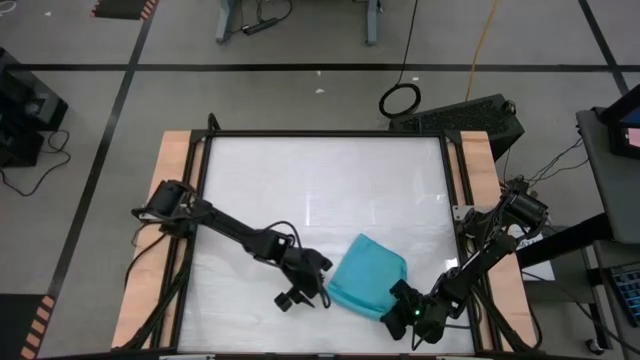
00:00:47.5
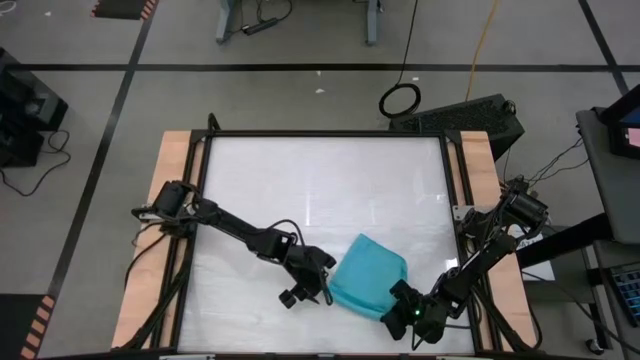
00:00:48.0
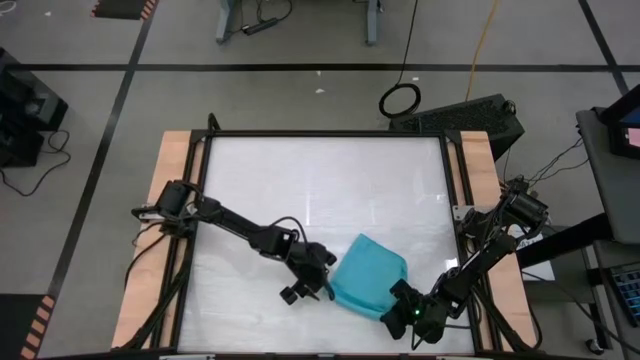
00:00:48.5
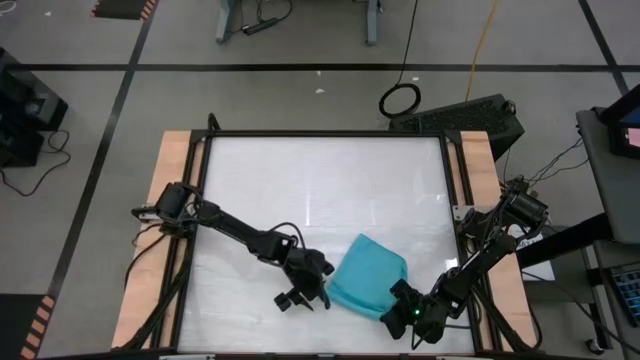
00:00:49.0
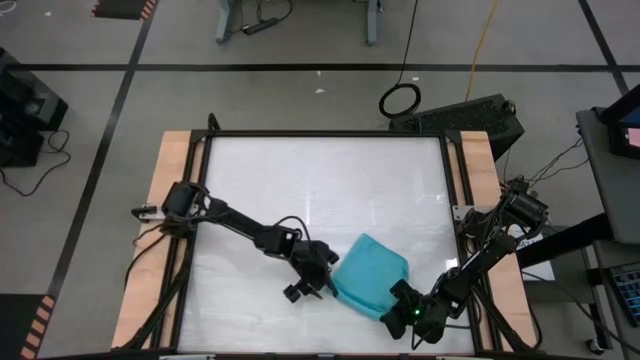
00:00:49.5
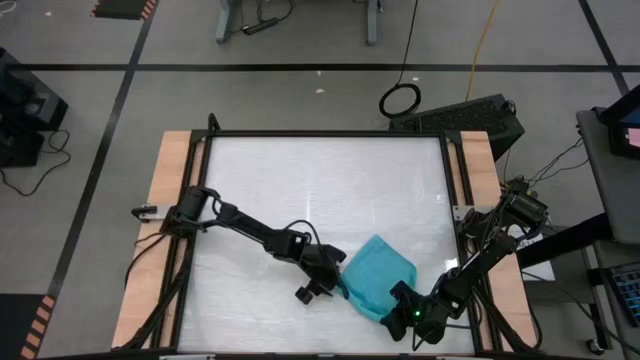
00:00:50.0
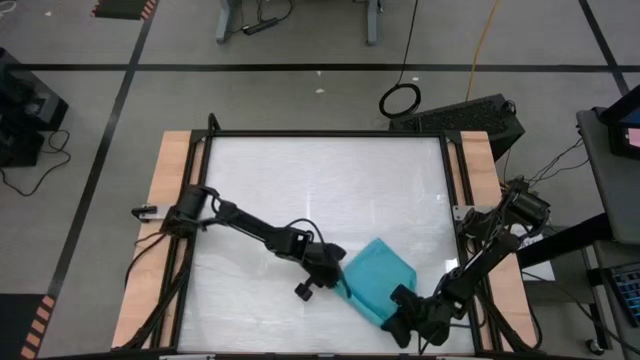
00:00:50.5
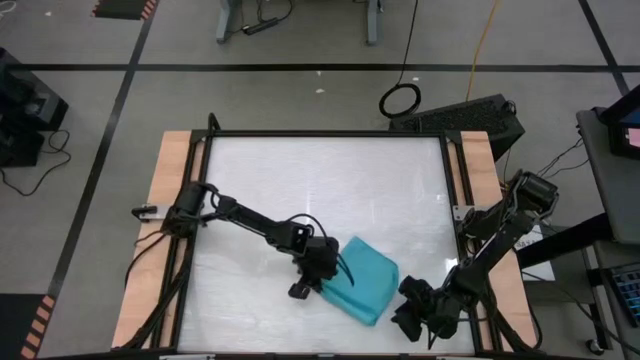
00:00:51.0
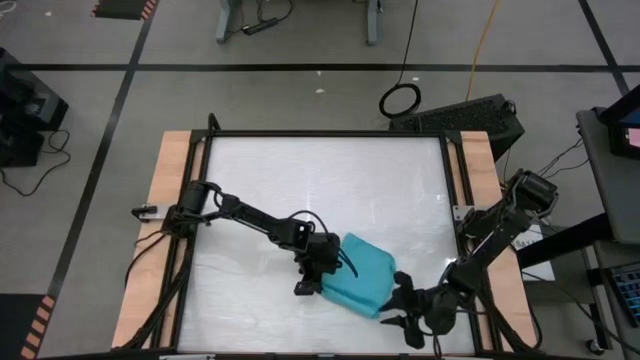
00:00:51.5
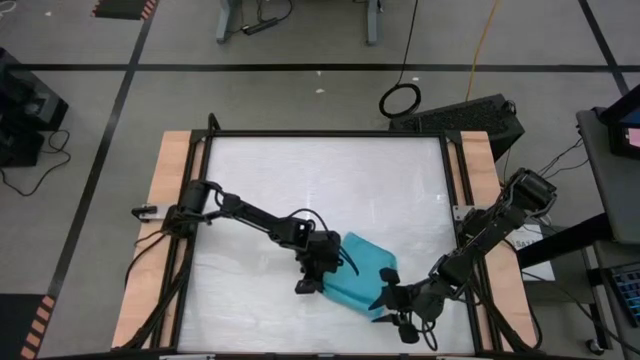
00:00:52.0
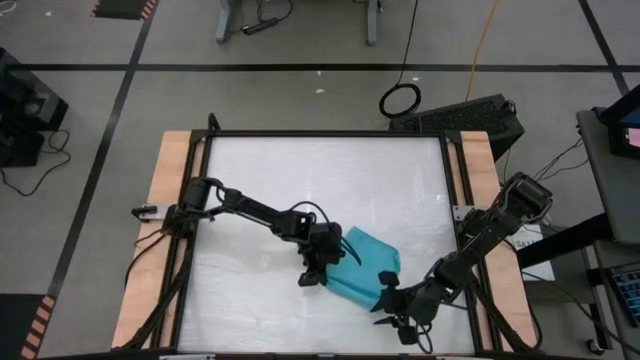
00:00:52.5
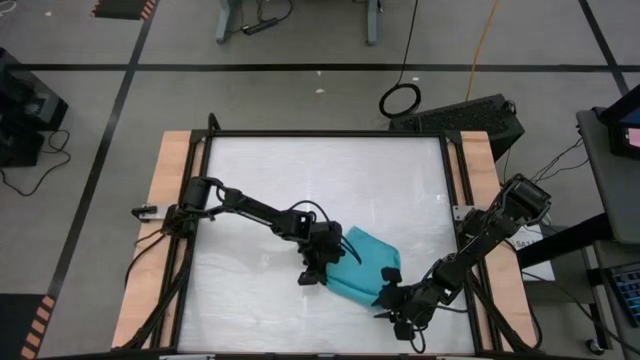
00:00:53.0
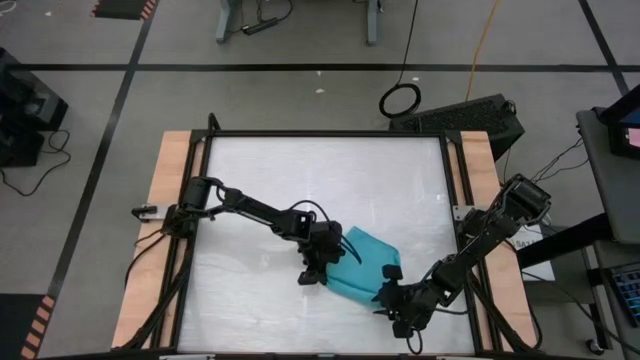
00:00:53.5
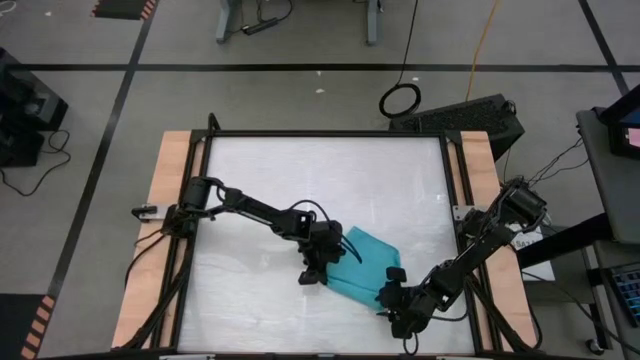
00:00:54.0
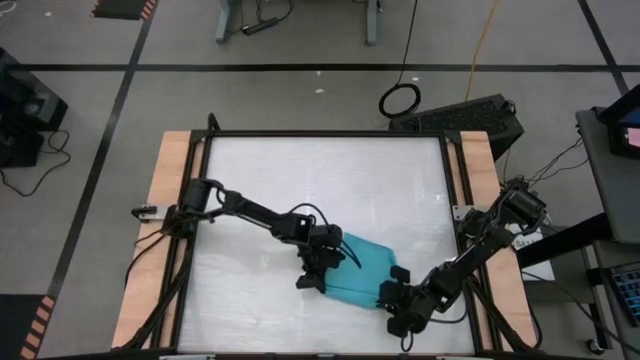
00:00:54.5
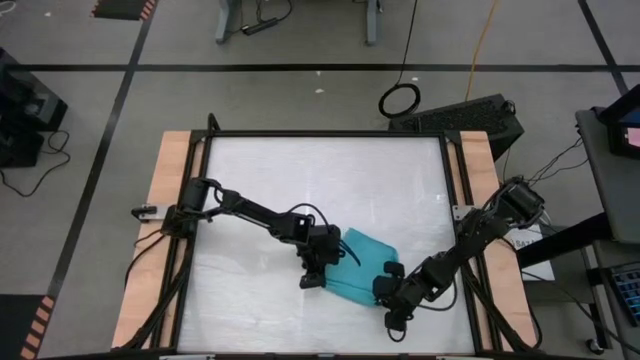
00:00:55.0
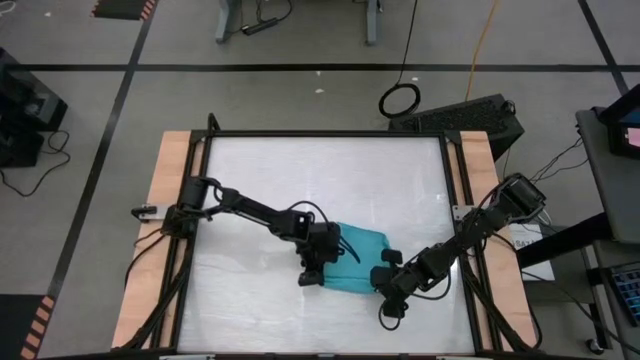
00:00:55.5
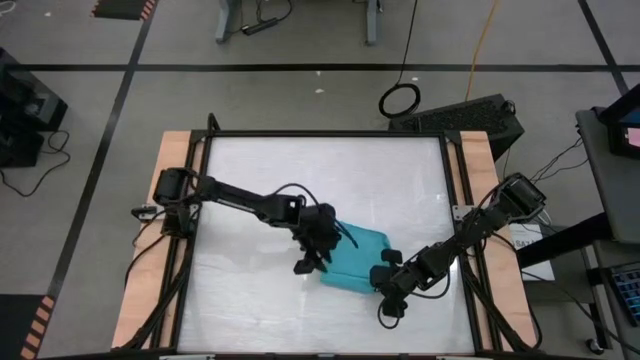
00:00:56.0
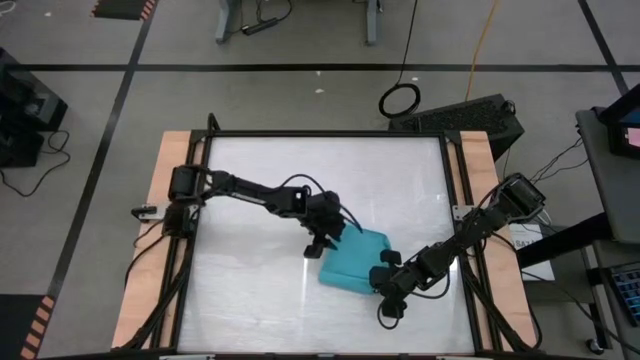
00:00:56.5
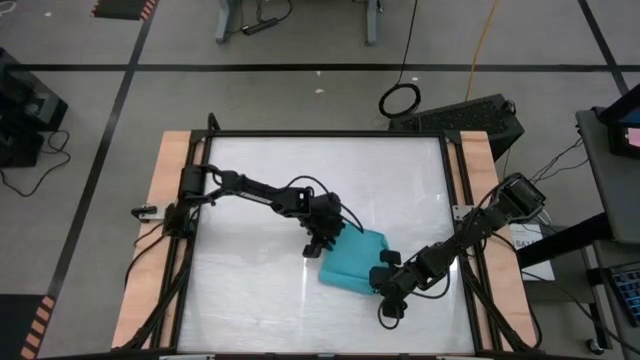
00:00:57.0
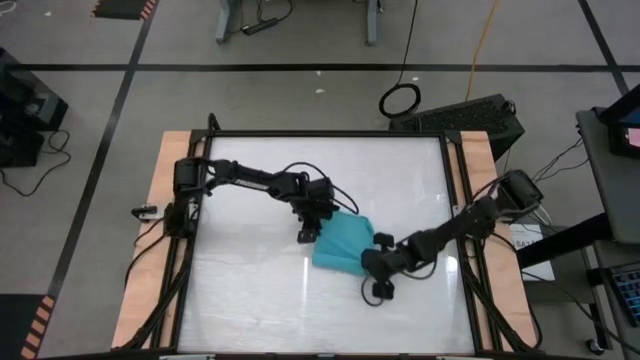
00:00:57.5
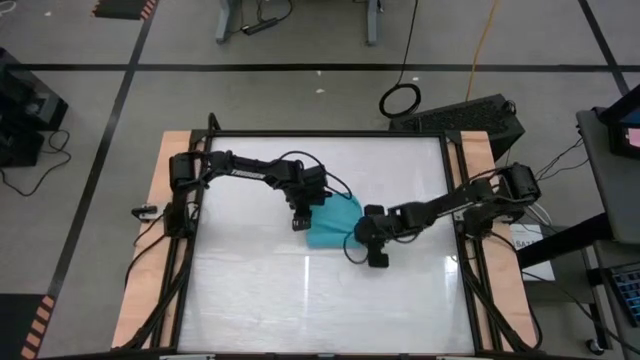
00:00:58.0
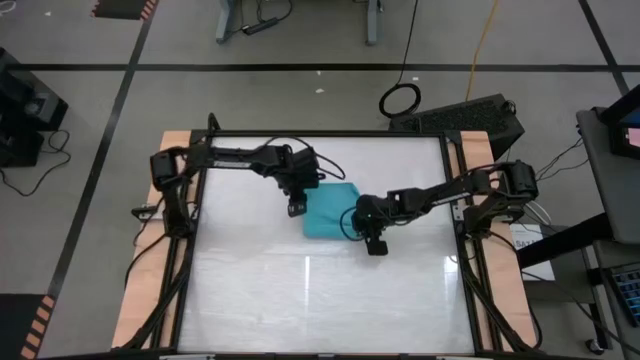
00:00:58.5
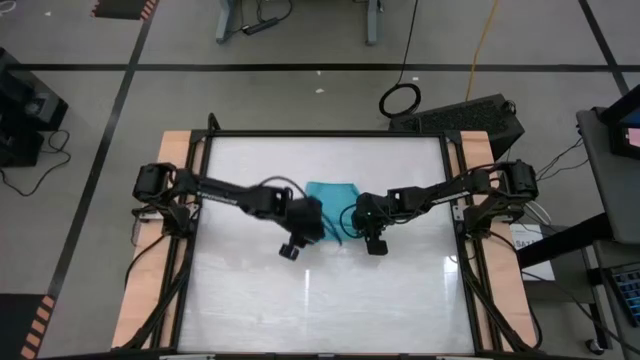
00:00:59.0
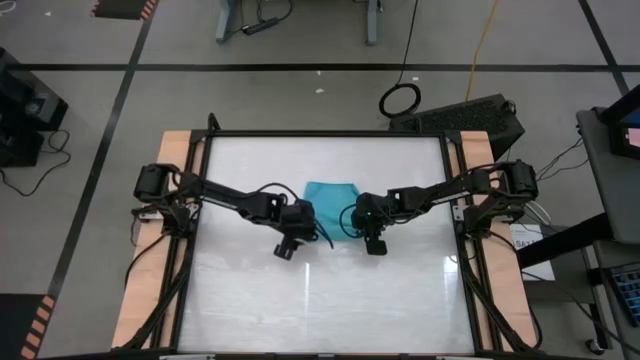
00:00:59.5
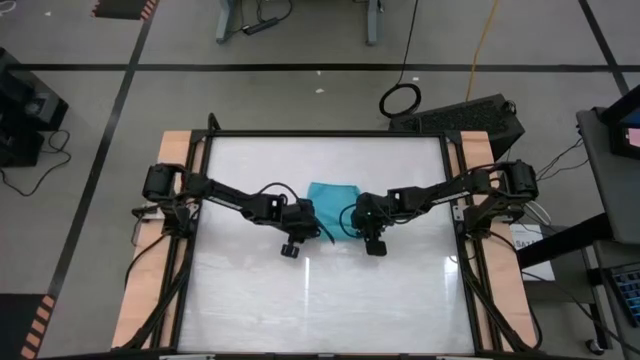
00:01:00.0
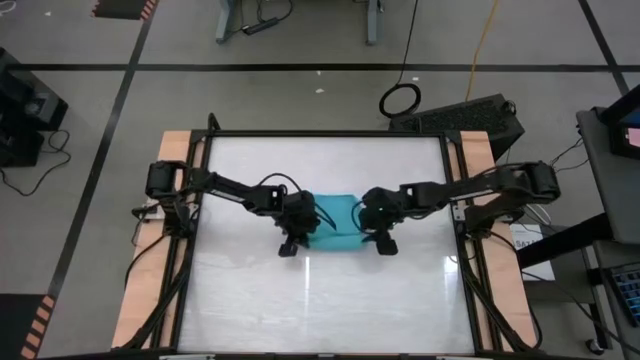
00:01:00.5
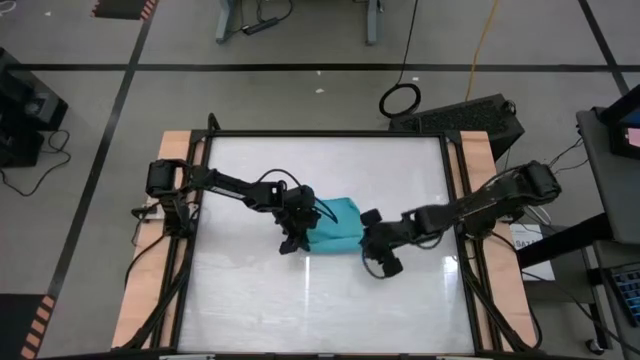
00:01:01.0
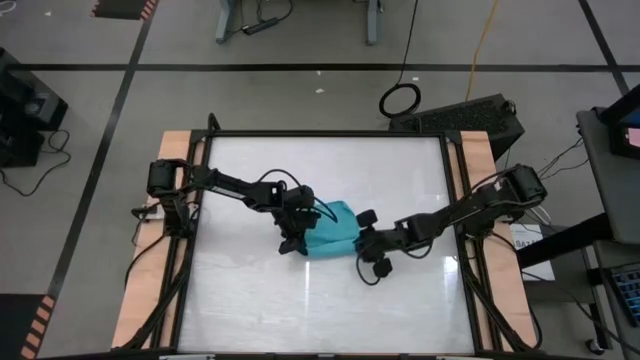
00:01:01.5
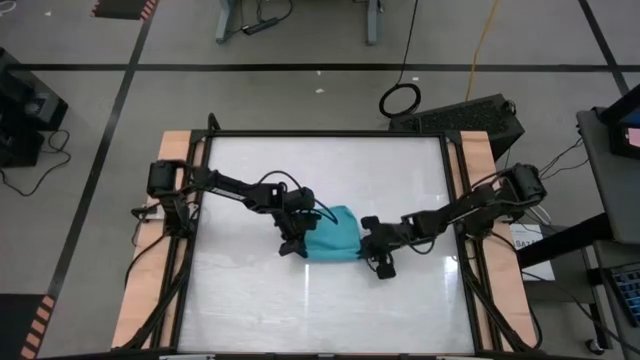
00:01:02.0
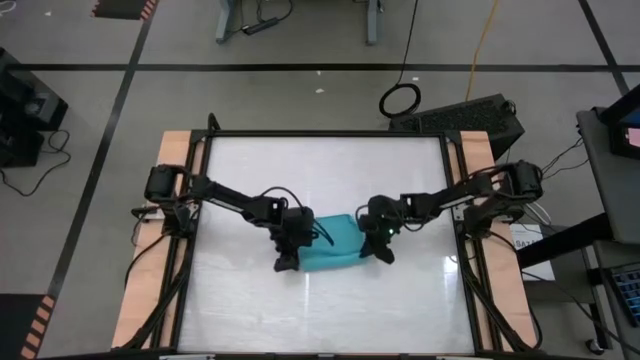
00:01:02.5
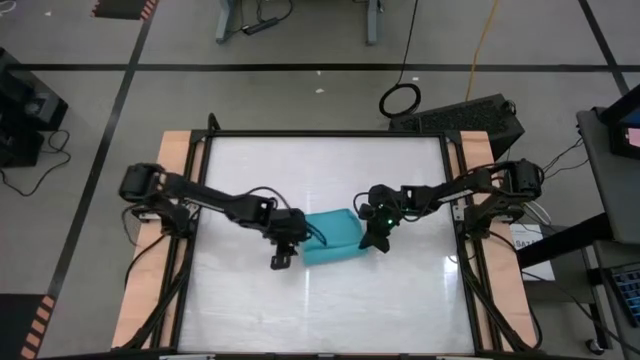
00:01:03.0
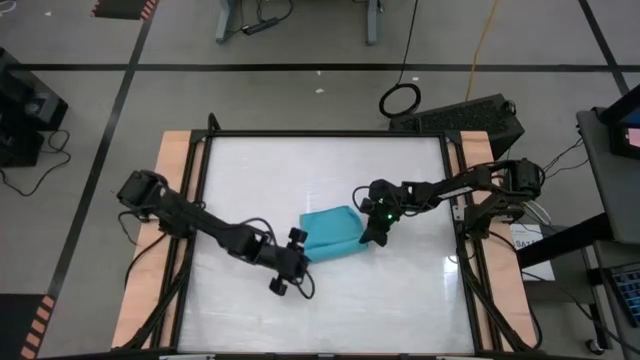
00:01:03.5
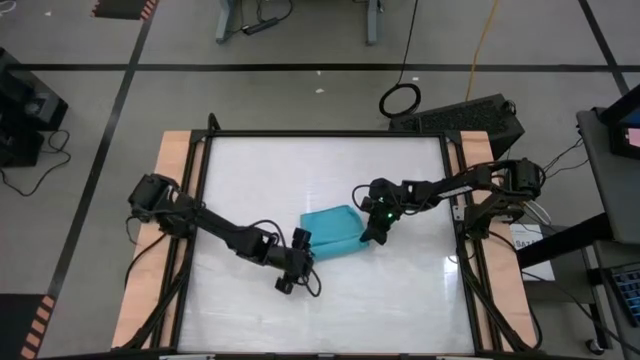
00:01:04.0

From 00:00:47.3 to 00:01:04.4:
Task: Roll towel
Roll the blue microfiber towel
